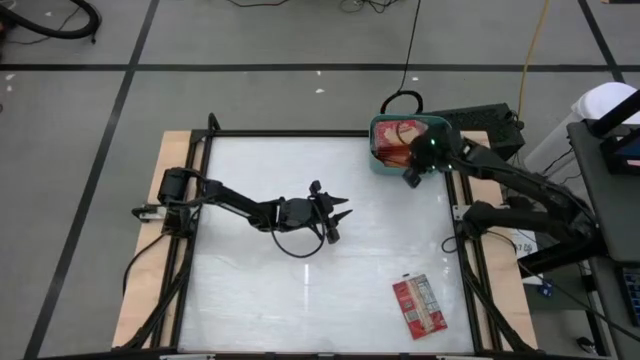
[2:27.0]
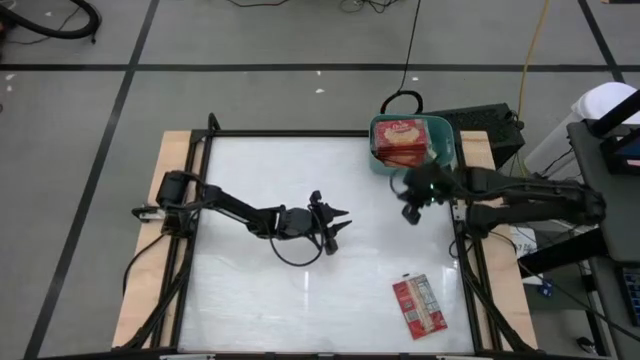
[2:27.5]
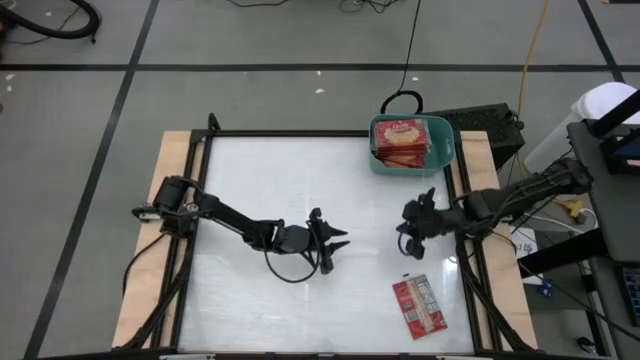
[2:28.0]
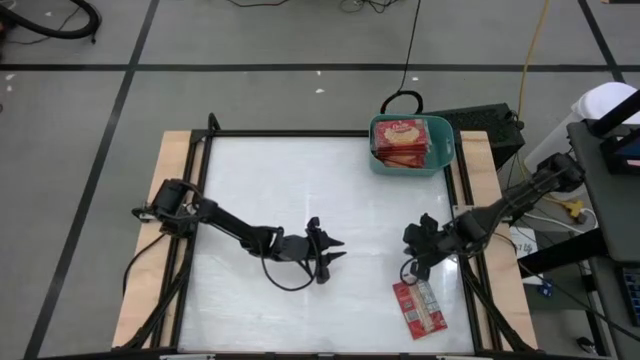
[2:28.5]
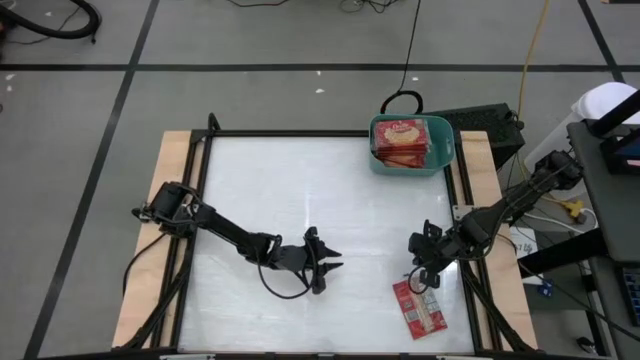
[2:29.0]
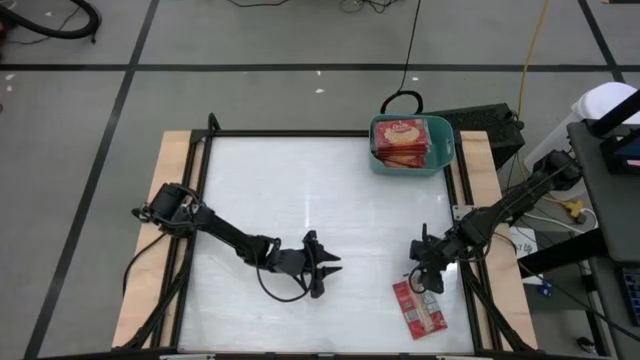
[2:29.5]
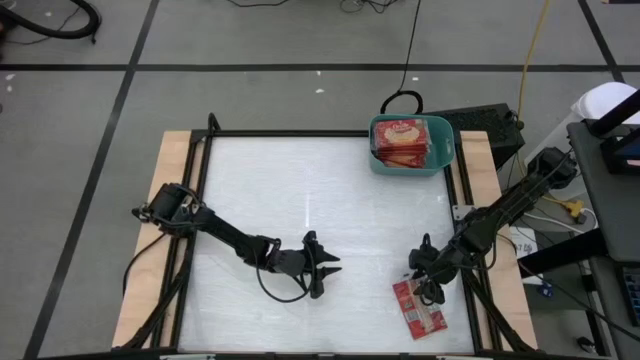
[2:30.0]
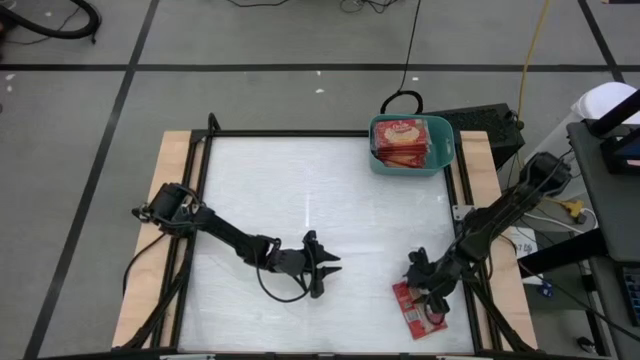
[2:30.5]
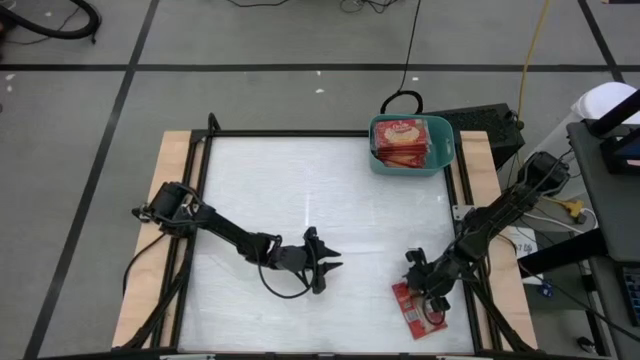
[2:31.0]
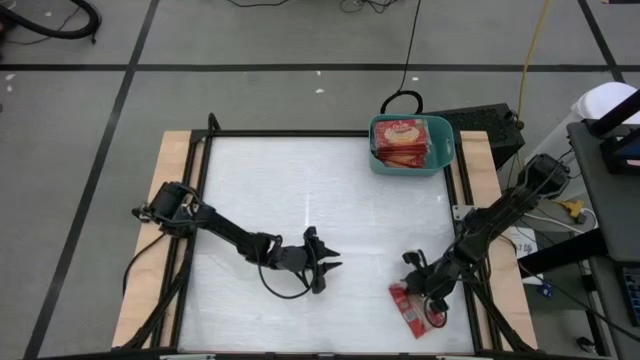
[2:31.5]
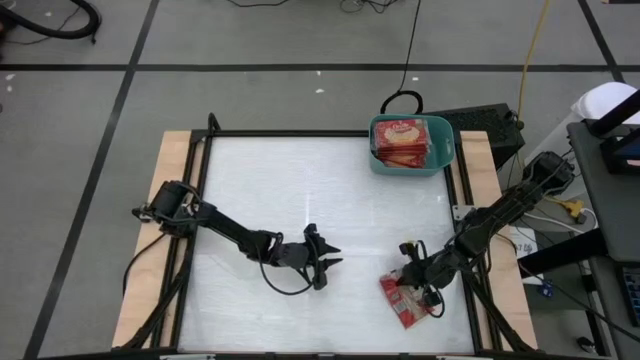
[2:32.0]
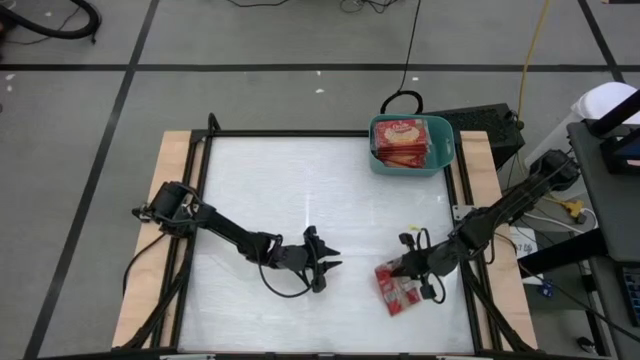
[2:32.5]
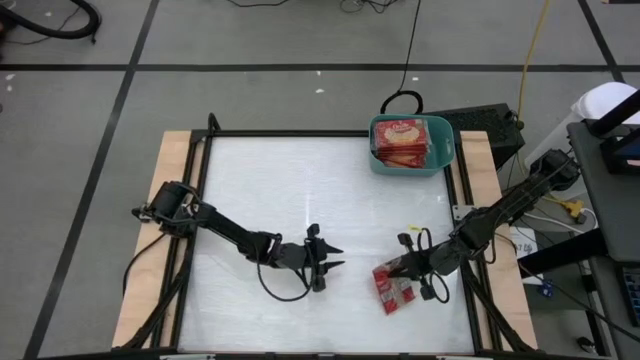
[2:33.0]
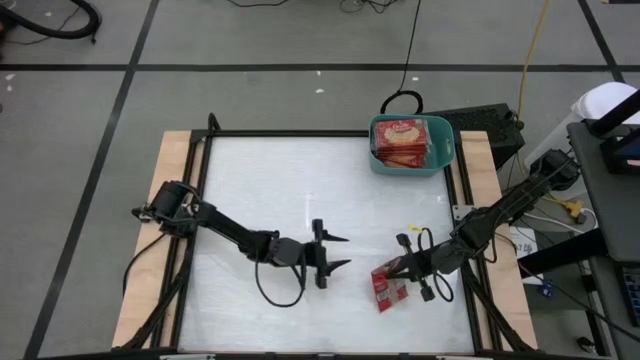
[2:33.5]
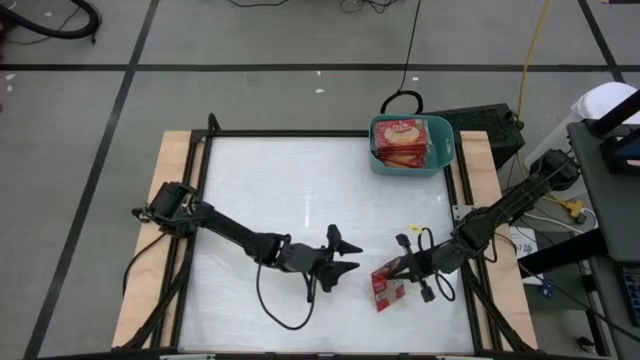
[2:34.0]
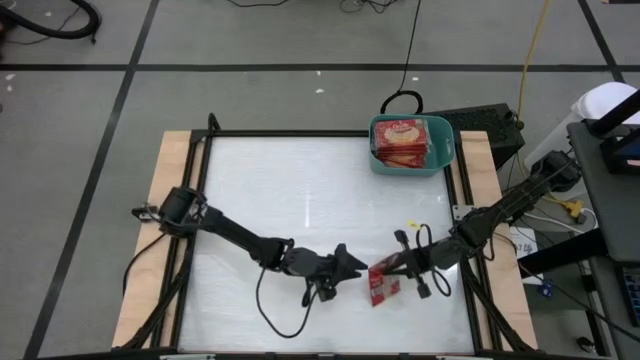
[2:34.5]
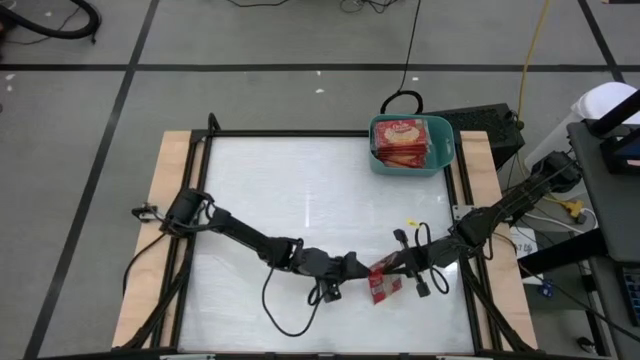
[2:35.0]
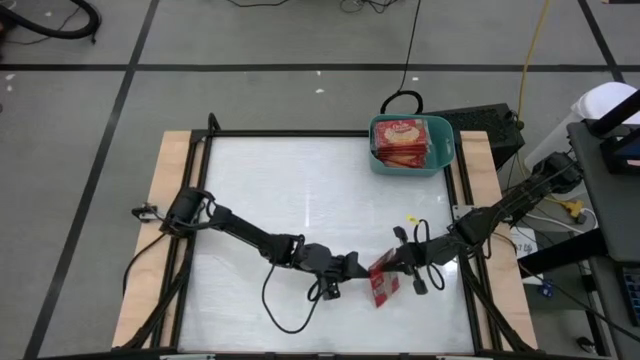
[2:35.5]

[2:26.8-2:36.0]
Task: Sort popcorn bags into baskets
Put the red popcorn bag into the green bin

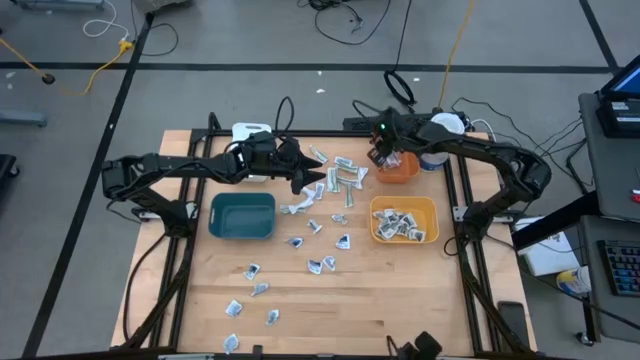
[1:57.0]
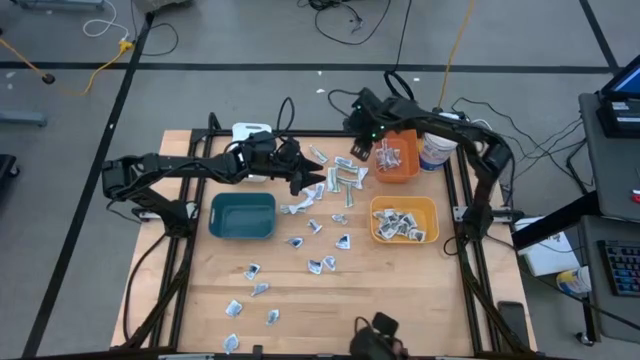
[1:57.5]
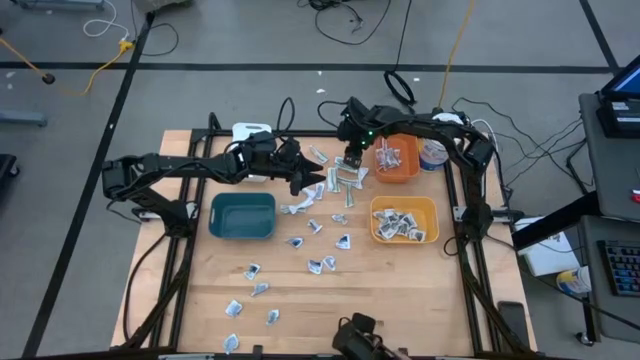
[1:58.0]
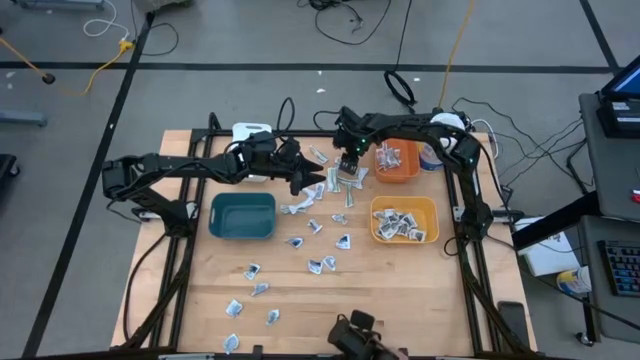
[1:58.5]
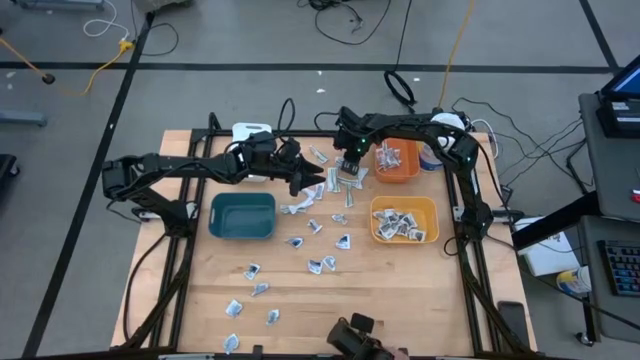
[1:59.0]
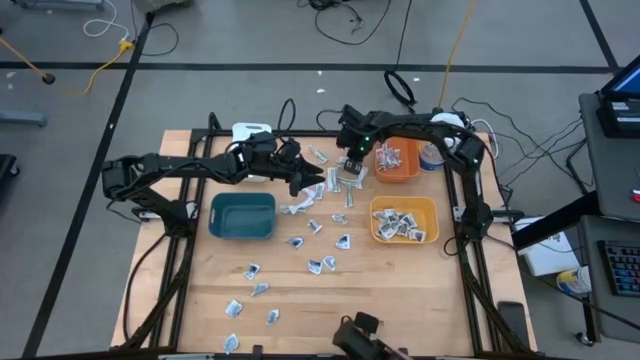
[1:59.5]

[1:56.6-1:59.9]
Task: Pick & Place First Aid Supplies
Put the antibiotic ointment into the orange bin

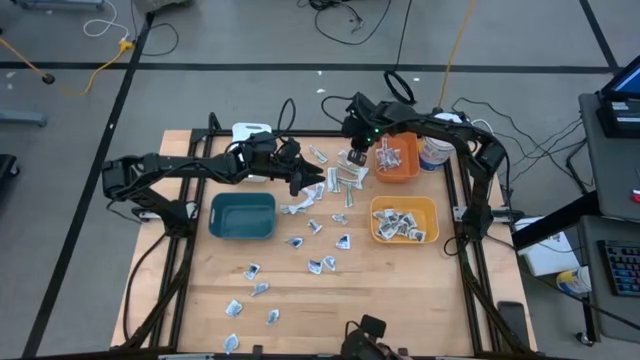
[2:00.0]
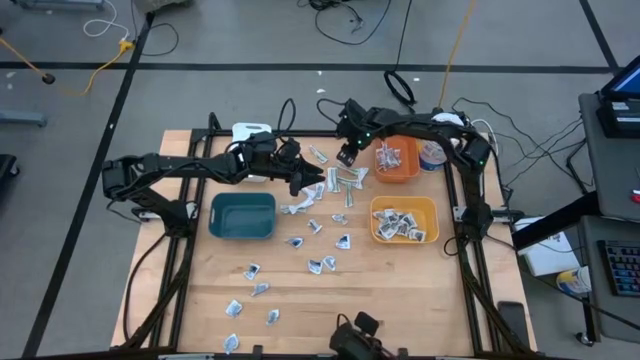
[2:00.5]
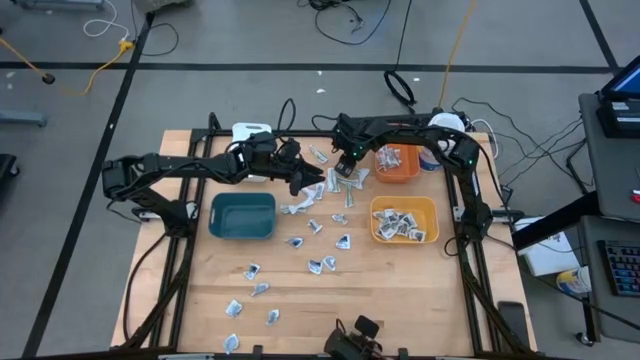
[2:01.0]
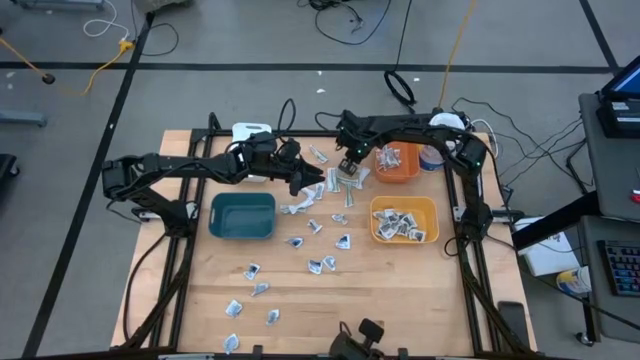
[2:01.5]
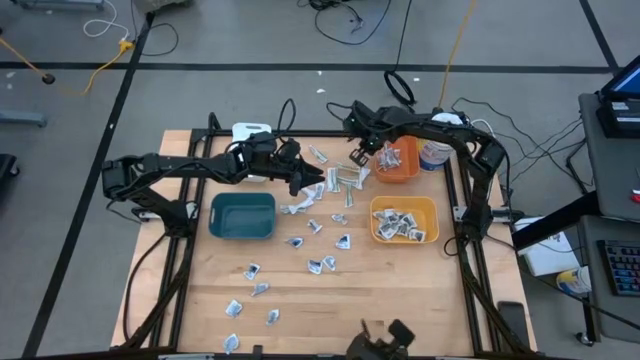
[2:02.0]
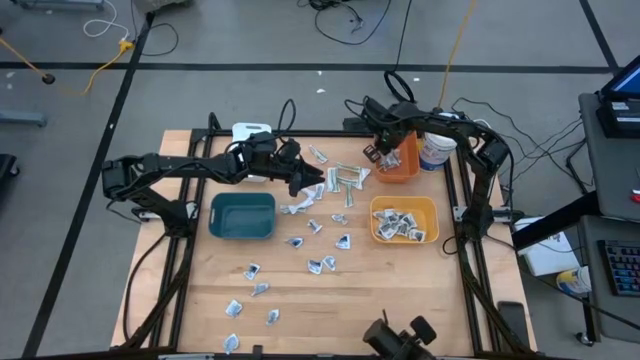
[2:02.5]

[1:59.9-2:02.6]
Put the antibiotic ointment into the orange bin

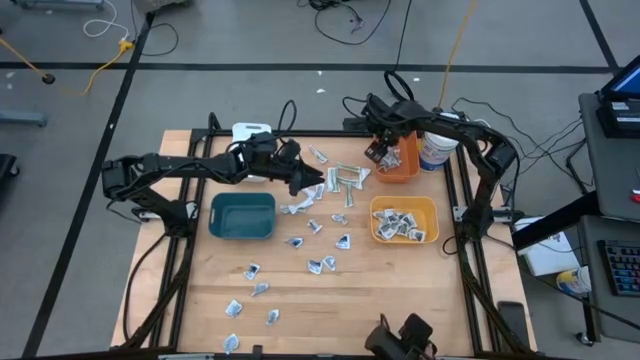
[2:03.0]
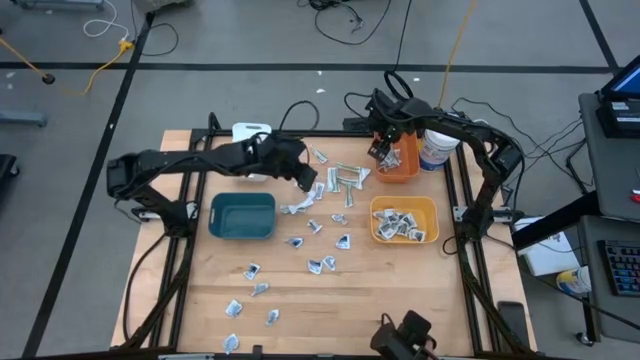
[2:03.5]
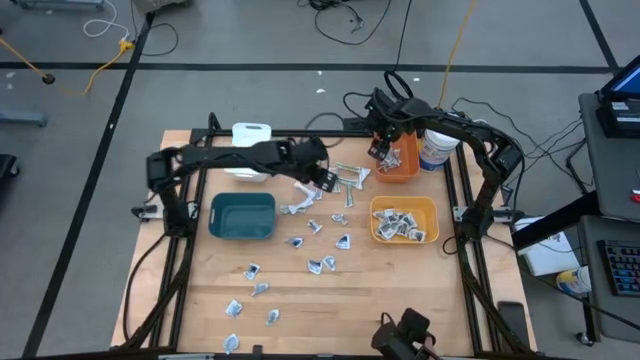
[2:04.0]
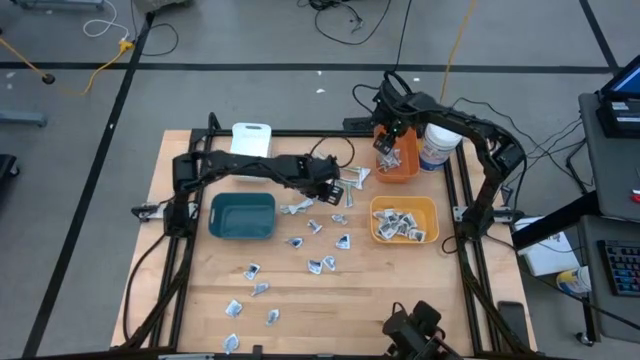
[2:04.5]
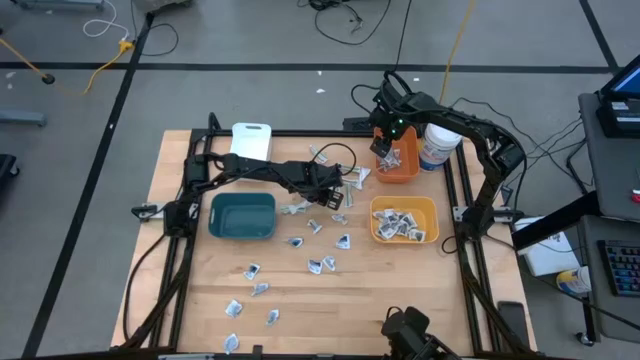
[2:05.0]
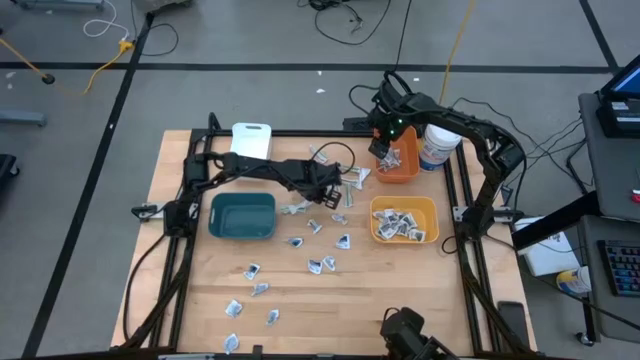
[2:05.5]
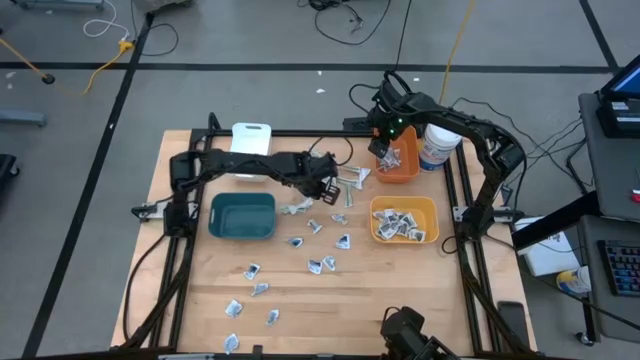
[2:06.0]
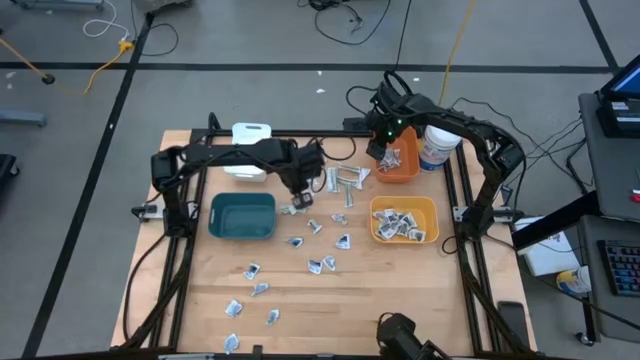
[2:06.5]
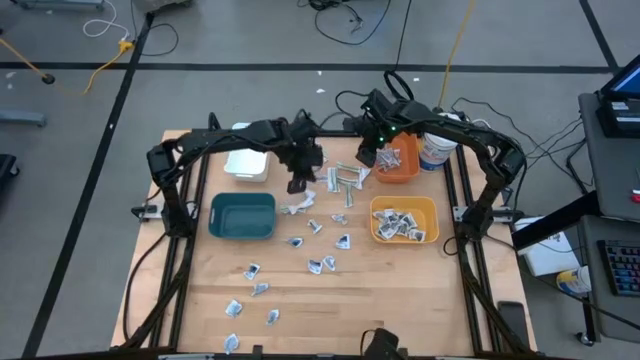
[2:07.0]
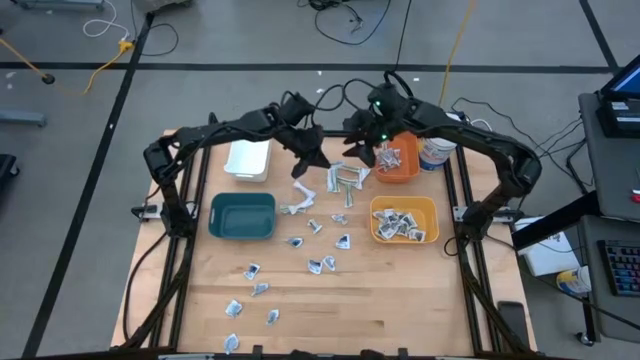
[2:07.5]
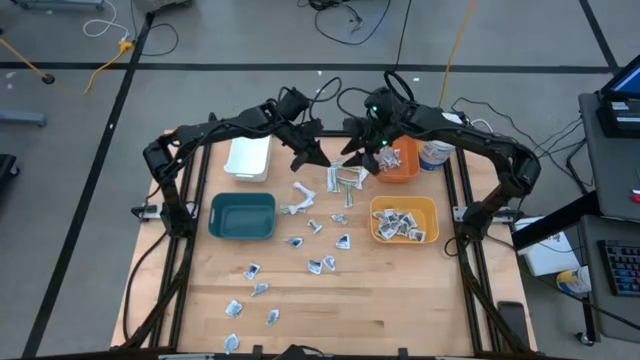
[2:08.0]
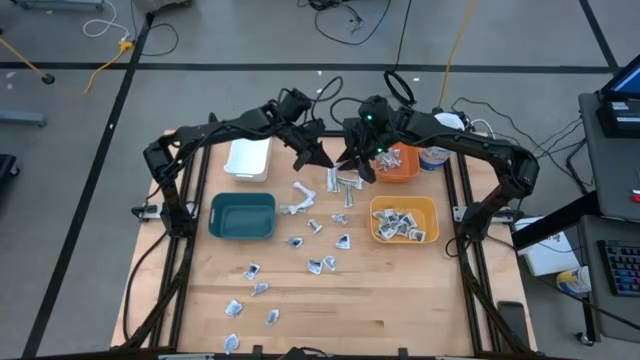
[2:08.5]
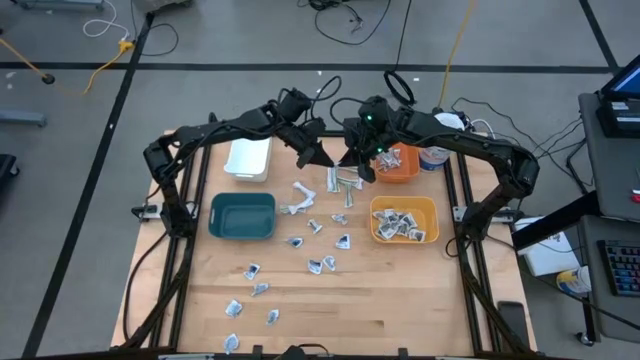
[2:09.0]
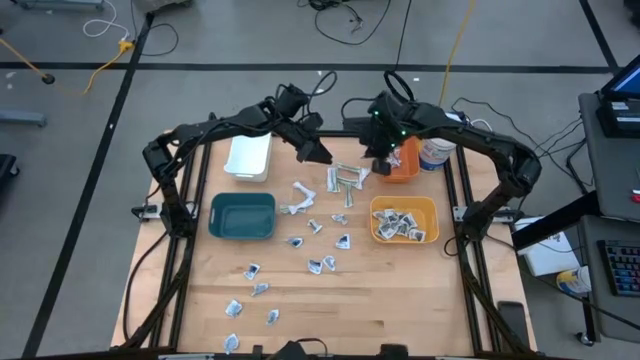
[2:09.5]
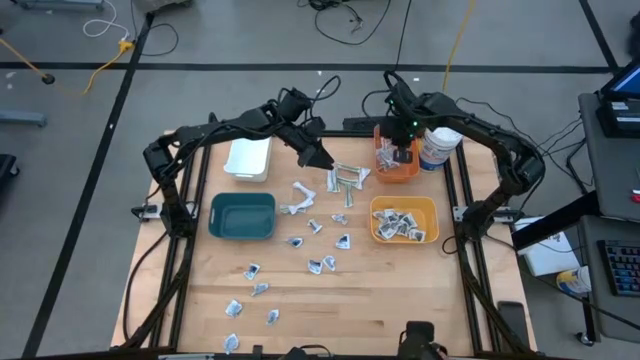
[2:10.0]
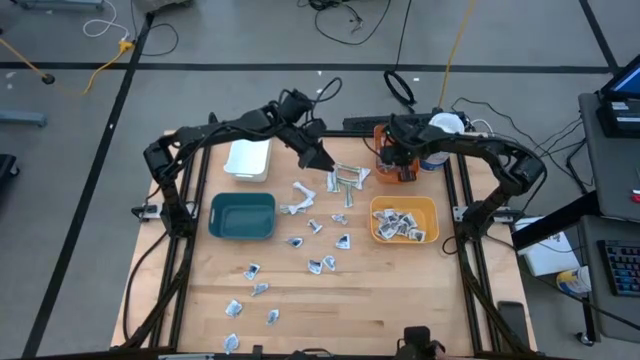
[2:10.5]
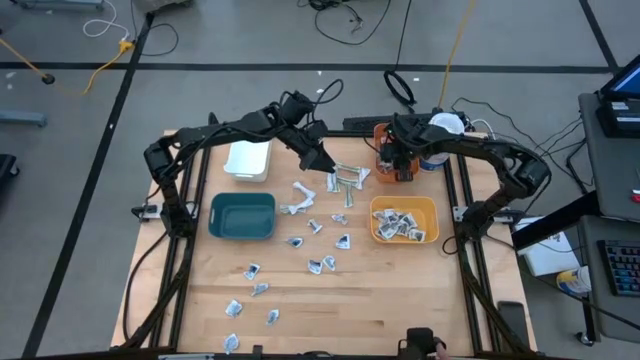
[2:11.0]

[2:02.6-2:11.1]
Put the antibiotic ointment into the orange bin
